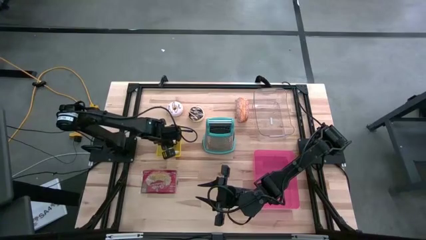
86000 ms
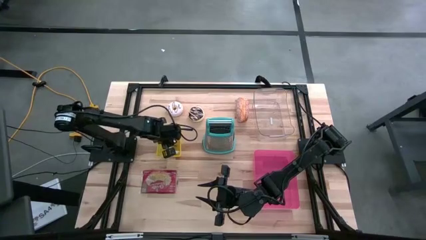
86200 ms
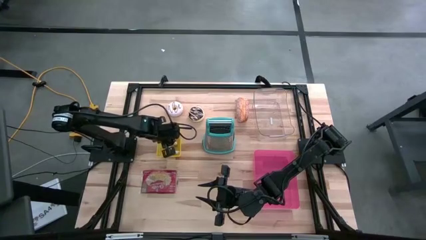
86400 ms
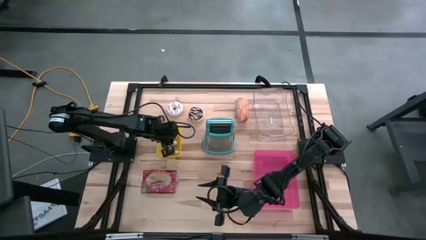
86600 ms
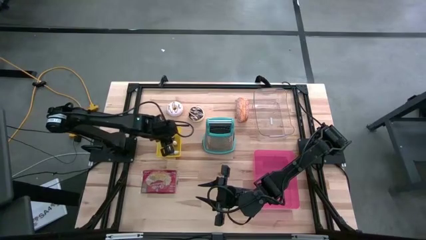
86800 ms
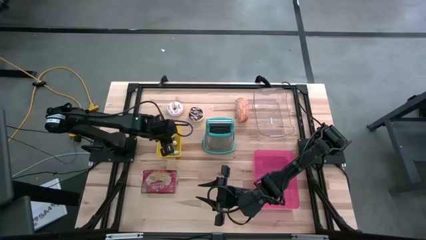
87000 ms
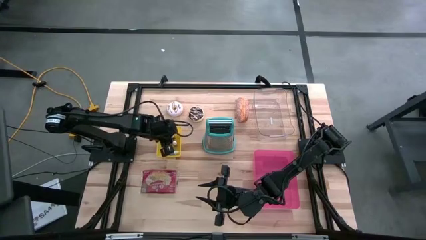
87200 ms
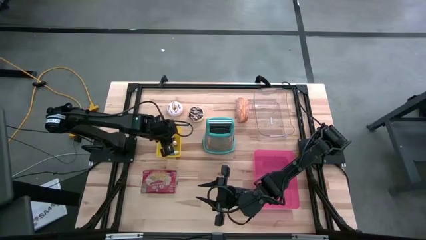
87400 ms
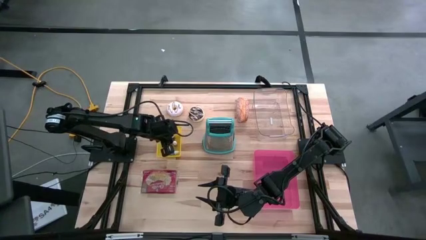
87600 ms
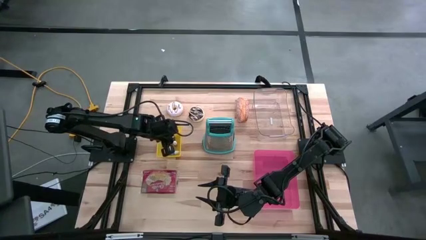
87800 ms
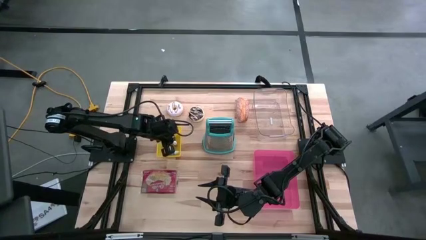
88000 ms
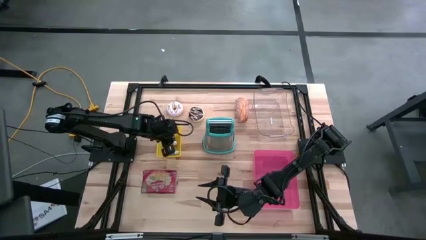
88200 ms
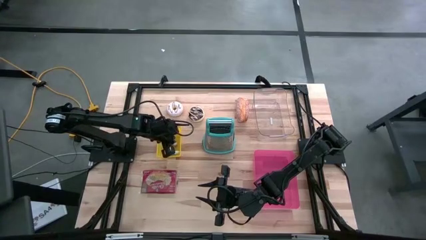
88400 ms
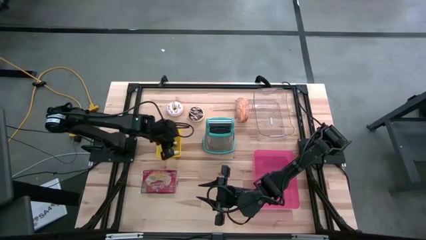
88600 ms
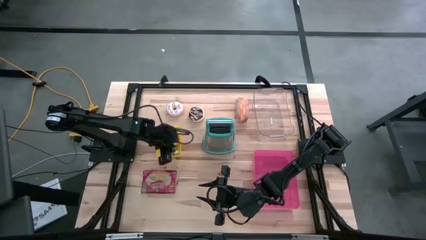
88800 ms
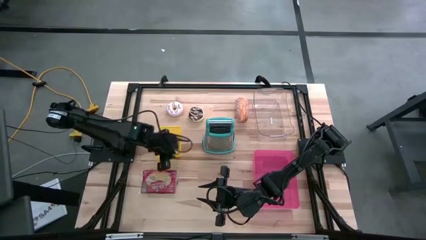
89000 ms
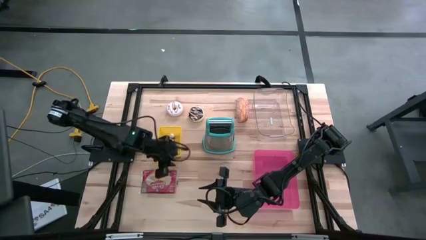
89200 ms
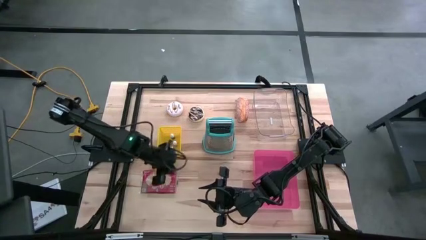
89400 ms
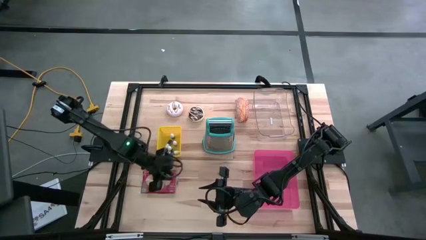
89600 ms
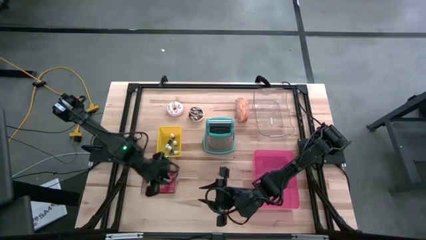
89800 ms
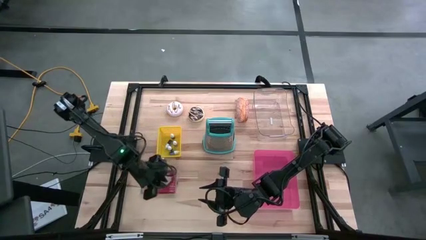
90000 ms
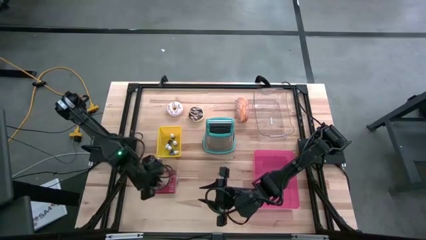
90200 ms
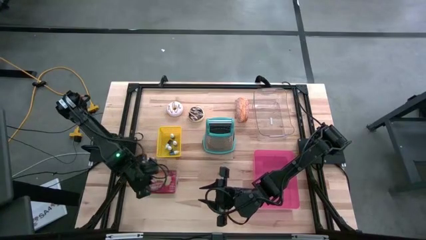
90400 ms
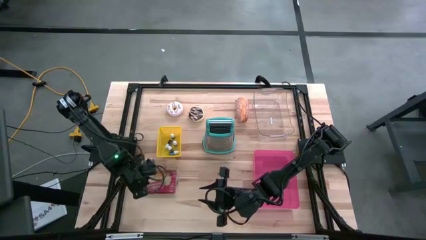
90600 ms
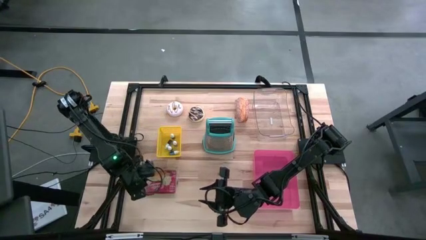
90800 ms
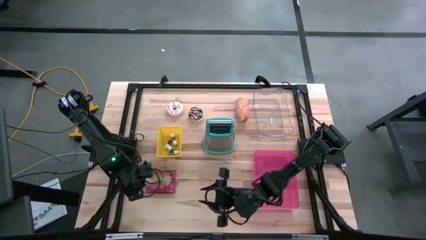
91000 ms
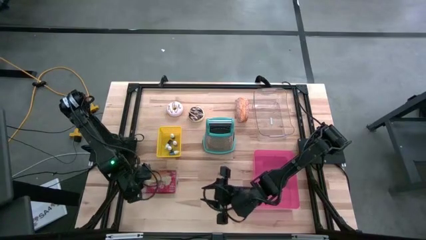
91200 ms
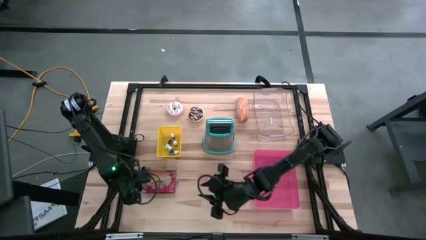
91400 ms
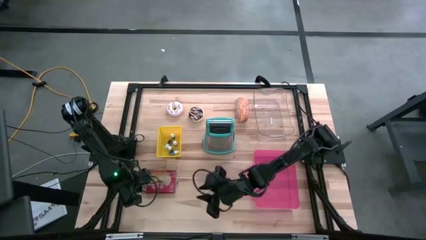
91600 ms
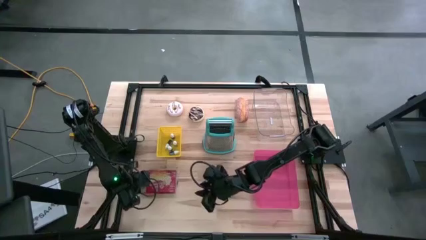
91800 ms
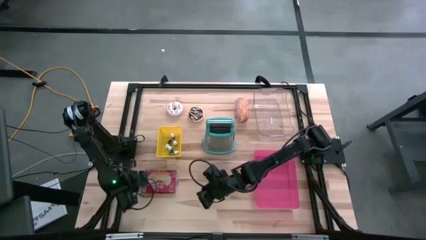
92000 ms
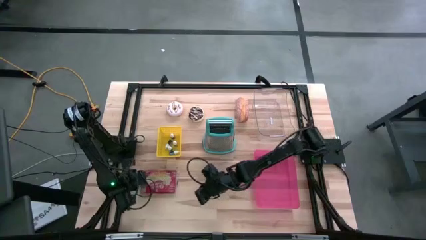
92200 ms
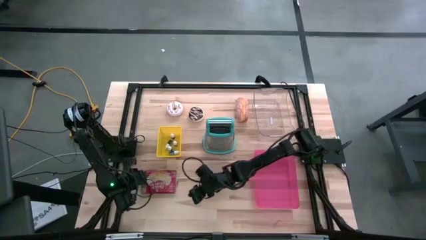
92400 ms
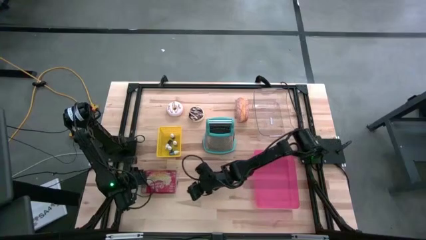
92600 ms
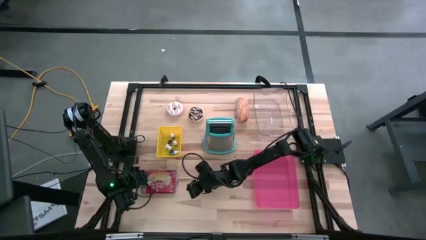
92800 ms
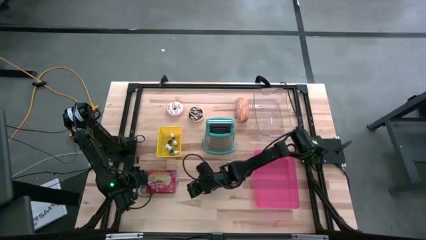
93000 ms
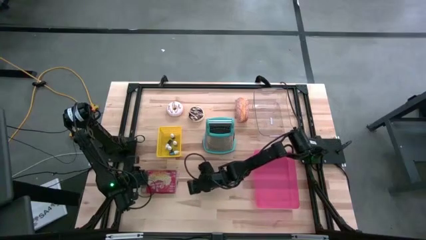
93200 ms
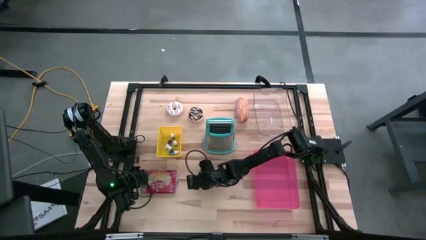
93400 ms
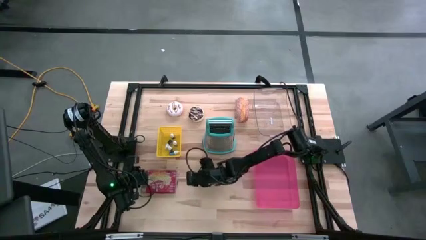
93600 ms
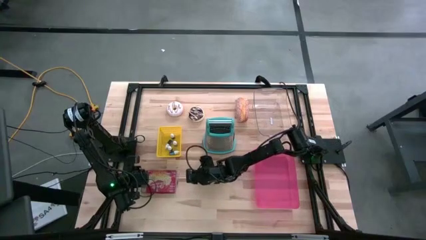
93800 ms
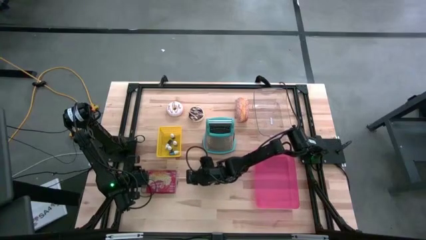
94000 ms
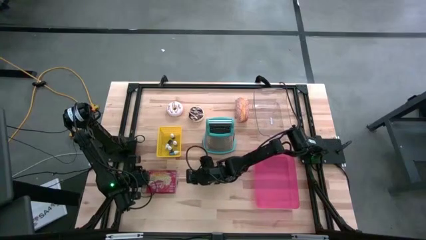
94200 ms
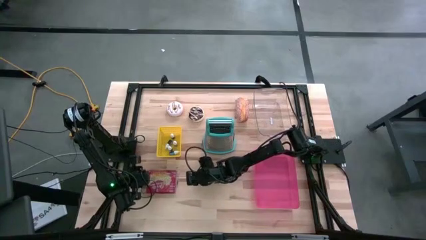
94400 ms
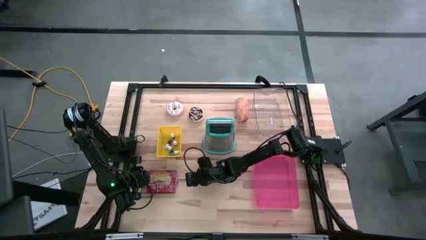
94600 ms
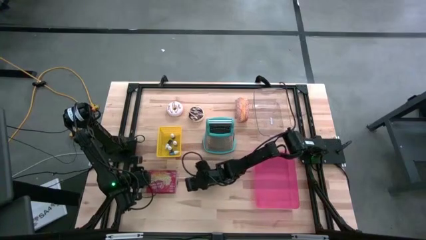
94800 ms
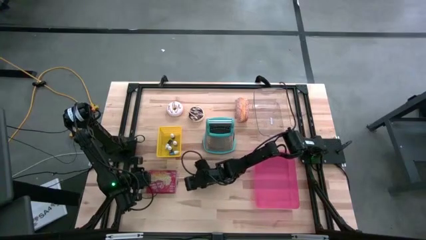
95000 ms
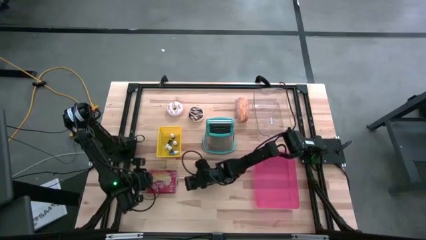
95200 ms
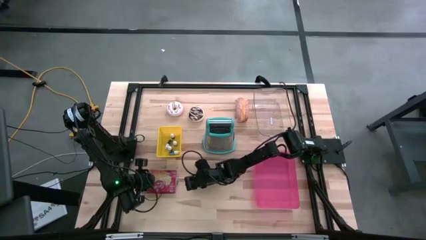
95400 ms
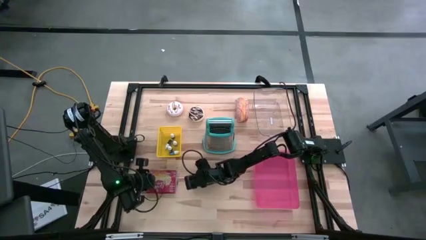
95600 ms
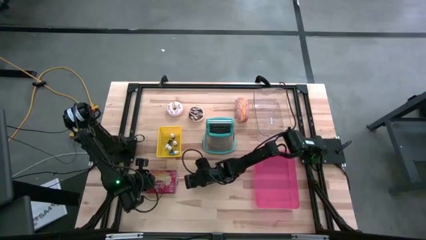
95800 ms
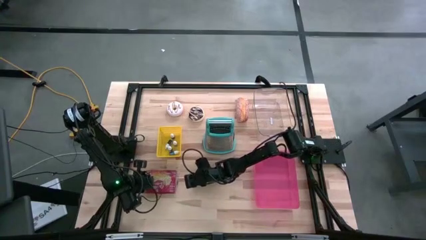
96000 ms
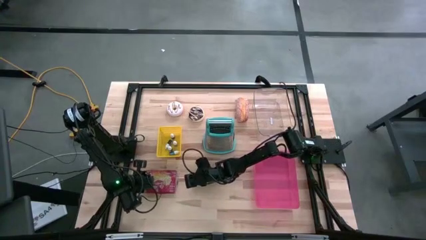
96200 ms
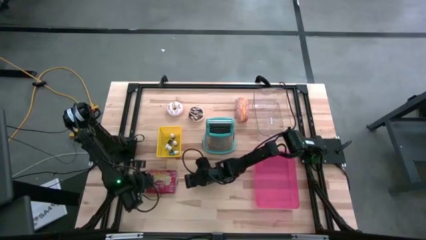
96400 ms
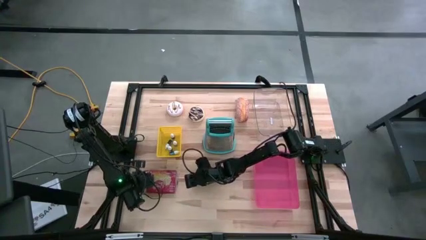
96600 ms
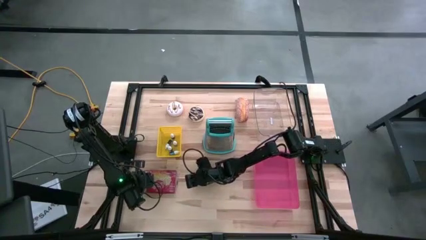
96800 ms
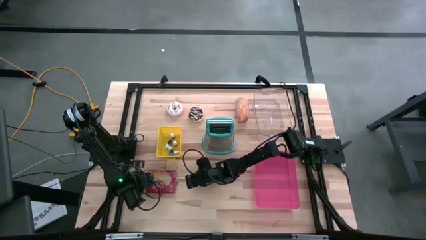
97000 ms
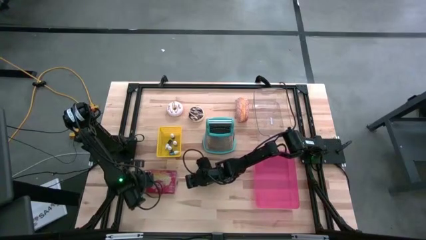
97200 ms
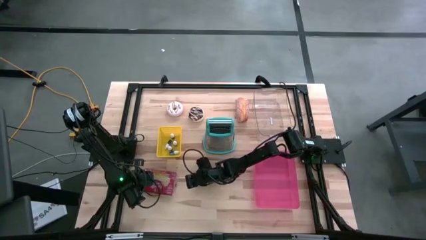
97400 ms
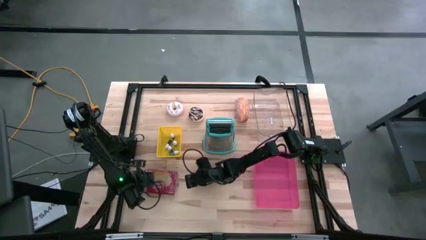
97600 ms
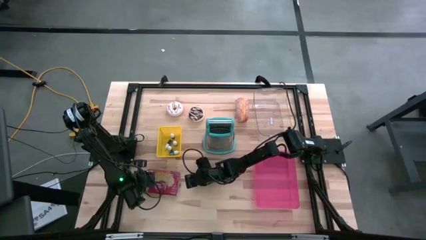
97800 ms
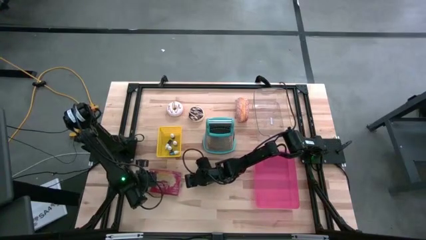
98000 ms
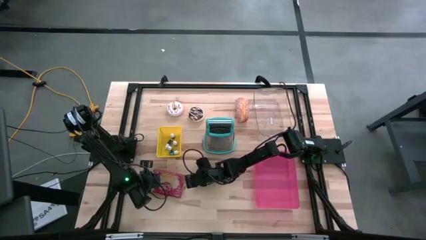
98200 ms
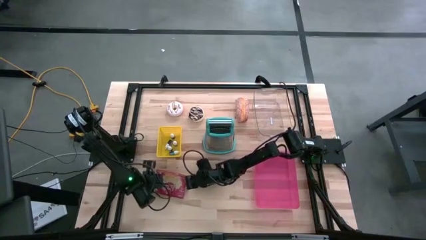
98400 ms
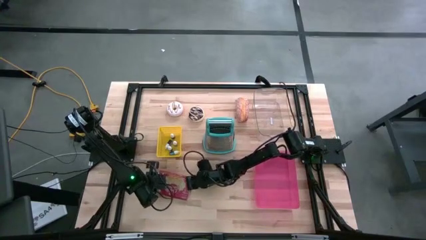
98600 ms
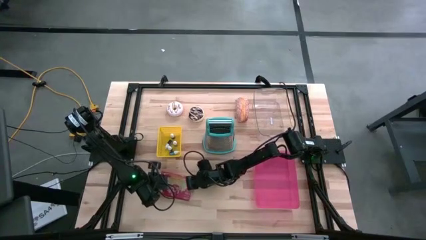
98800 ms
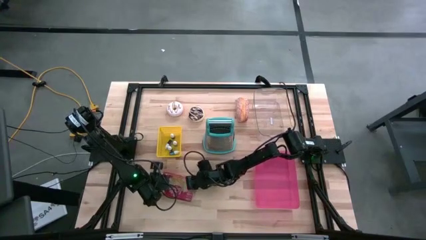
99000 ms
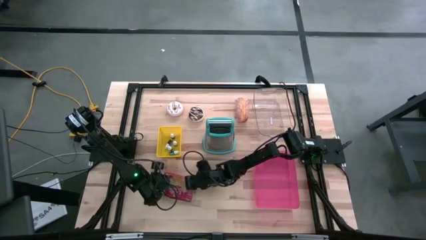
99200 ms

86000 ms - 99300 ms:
Put the popcorn bag into the pink bin
